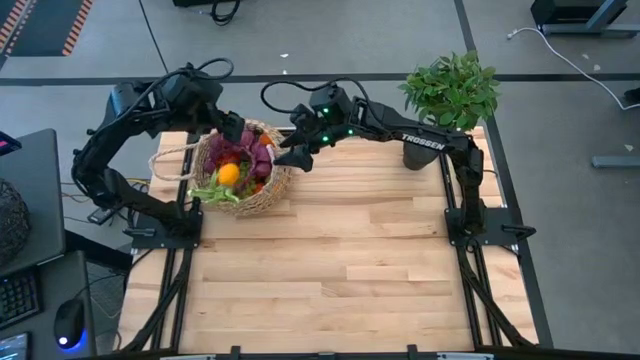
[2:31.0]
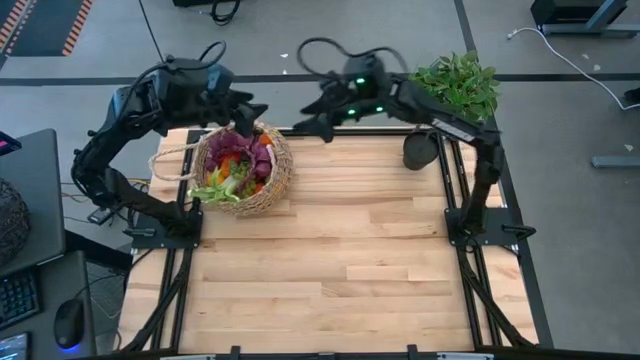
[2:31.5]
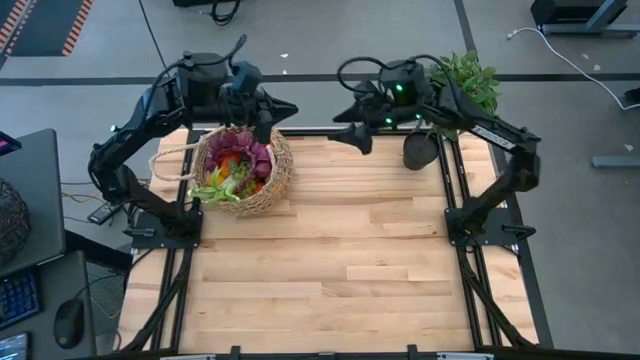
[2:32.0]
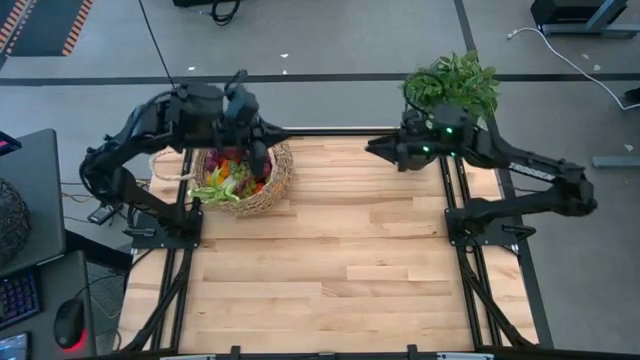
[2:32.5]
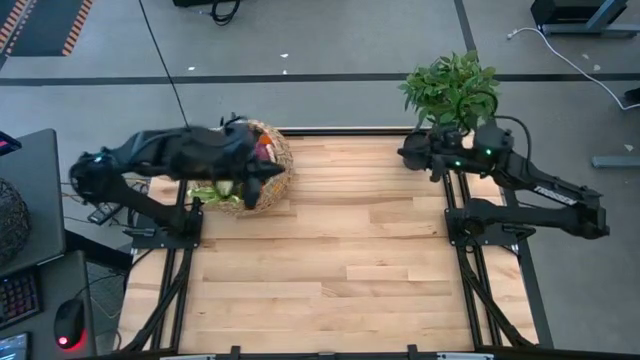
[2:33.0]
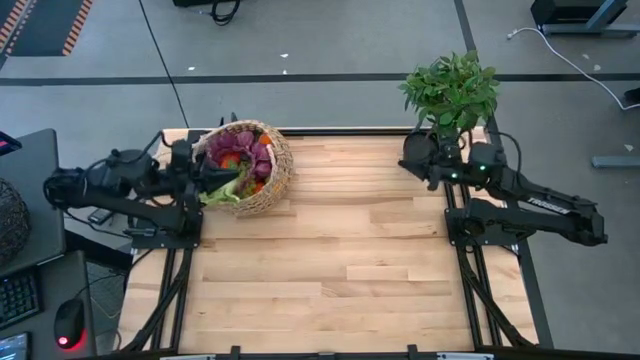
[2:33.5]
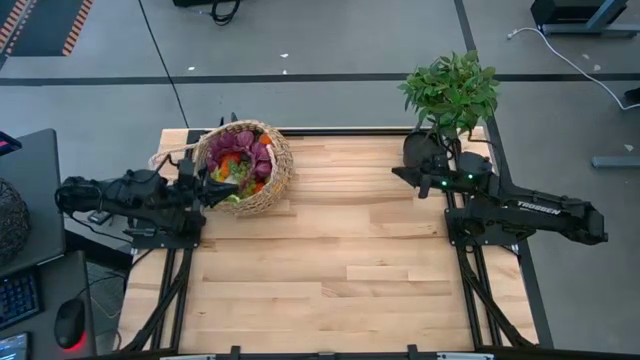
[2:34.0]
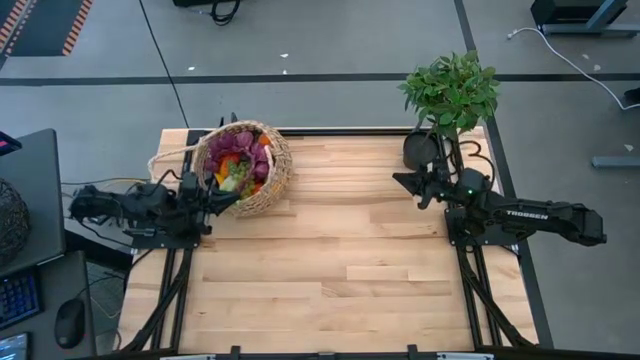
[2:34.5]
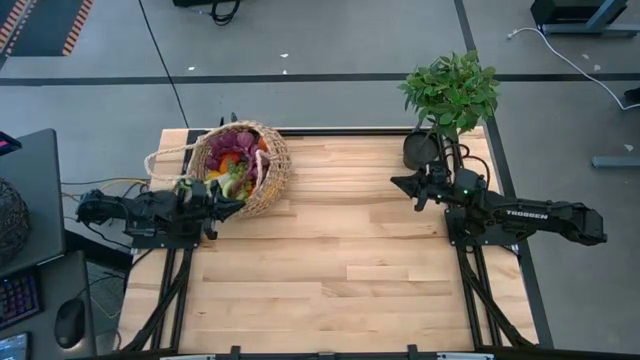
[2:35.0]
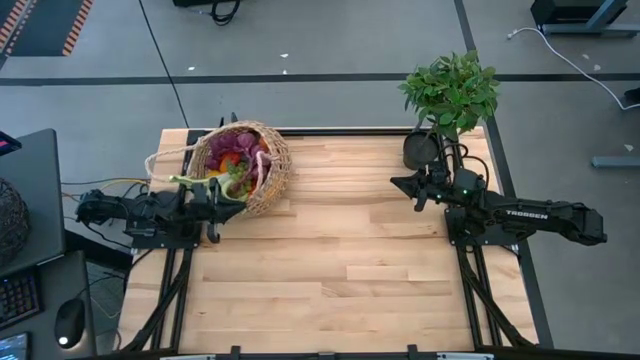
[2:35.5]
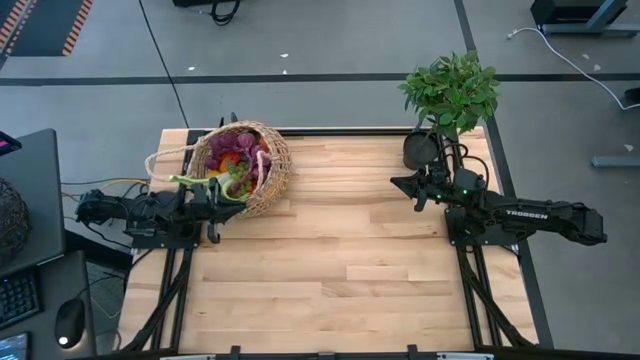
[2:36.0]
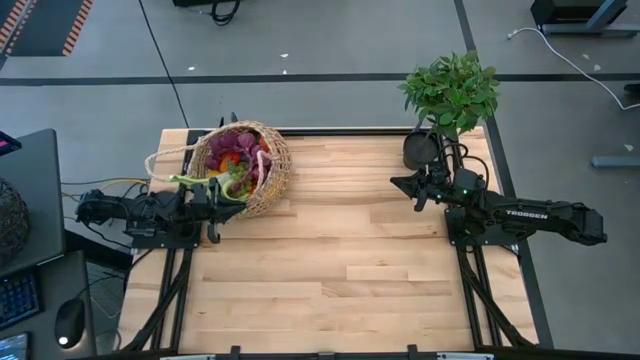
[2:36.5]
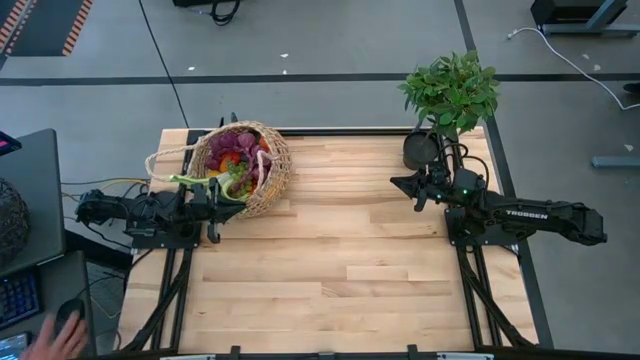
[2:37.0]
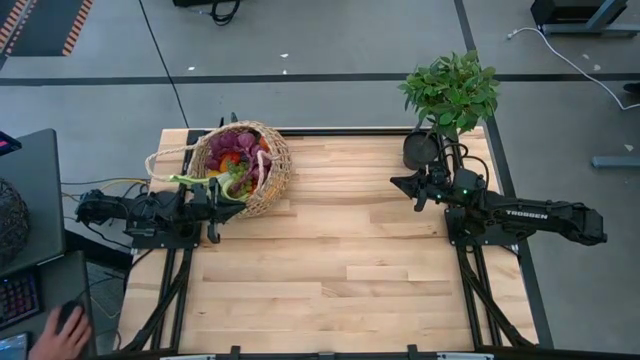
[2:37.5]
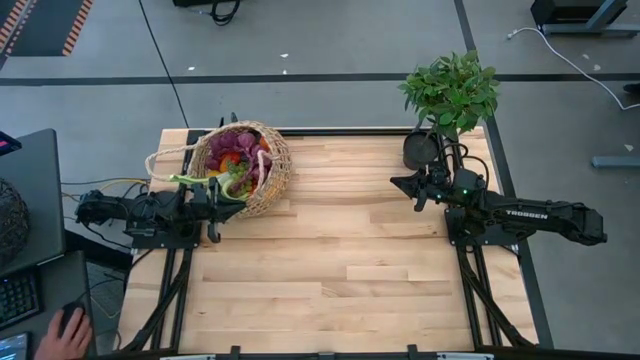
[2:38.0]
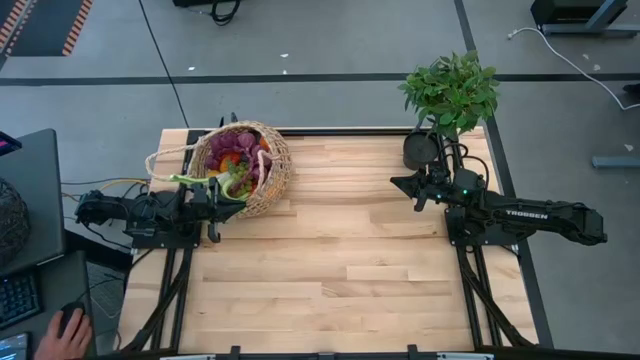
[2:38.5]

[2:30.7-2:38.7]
Task: Build produce basket
Return to Home Position

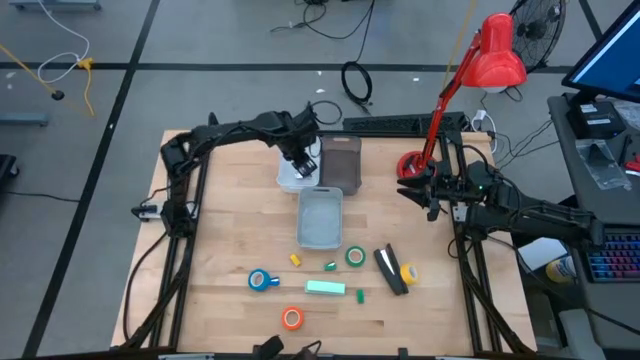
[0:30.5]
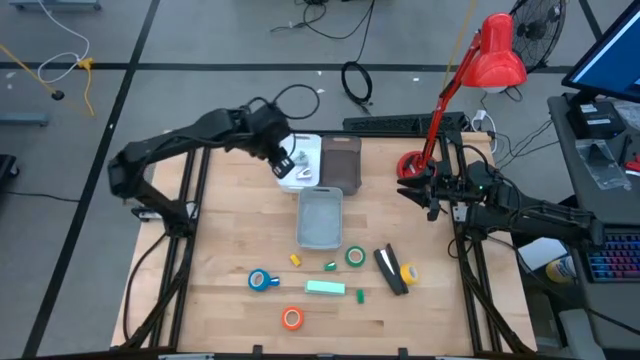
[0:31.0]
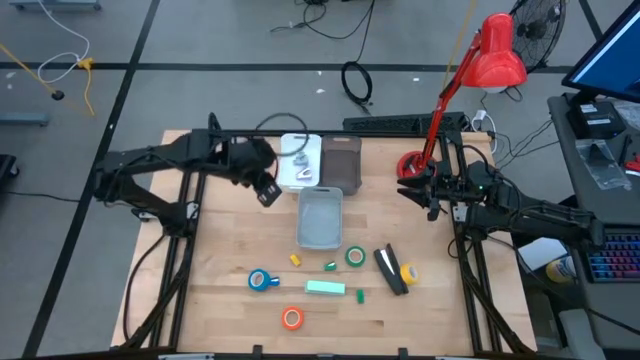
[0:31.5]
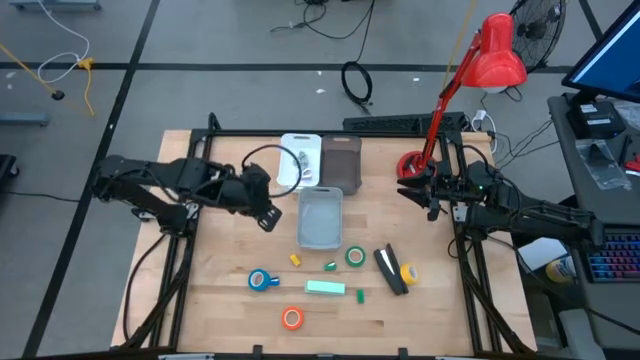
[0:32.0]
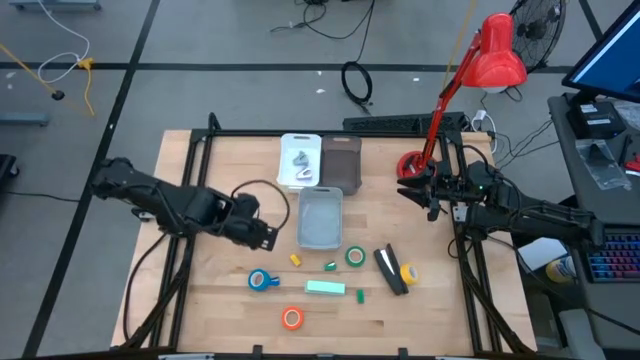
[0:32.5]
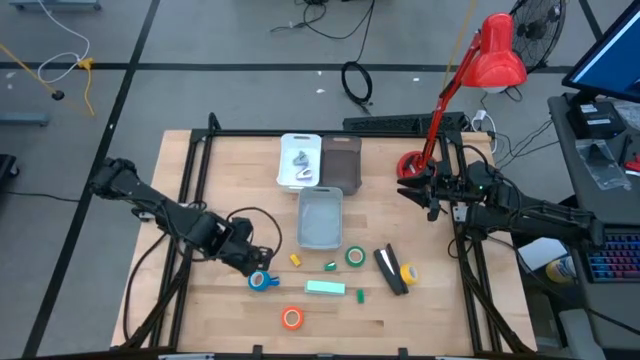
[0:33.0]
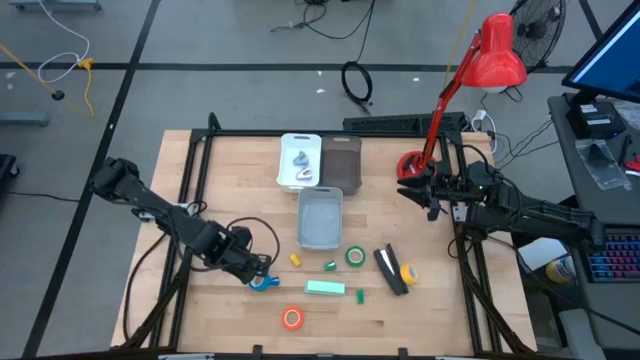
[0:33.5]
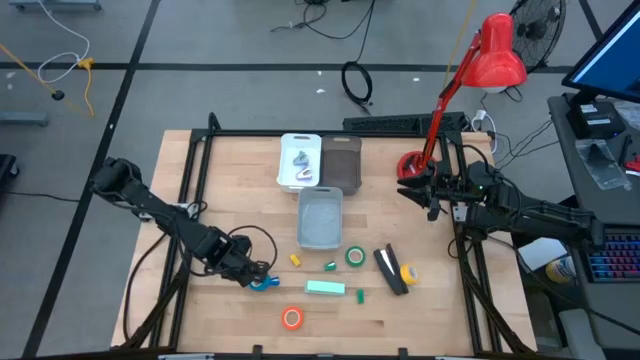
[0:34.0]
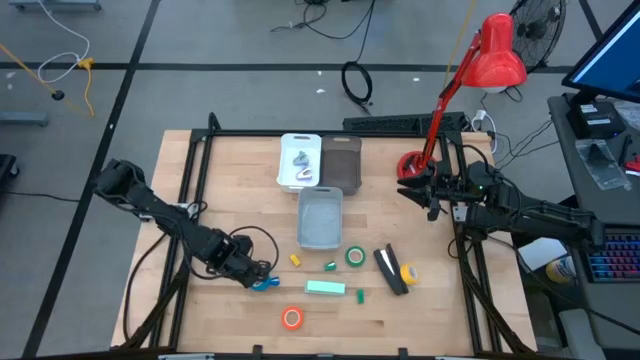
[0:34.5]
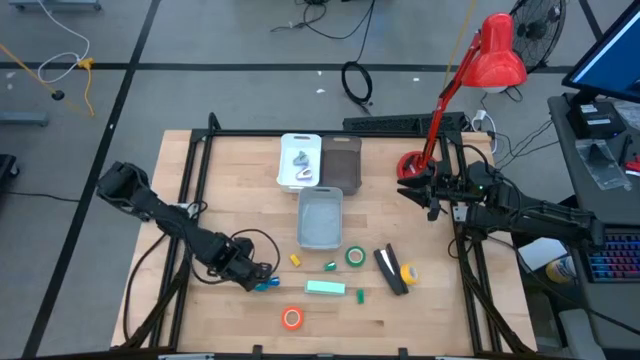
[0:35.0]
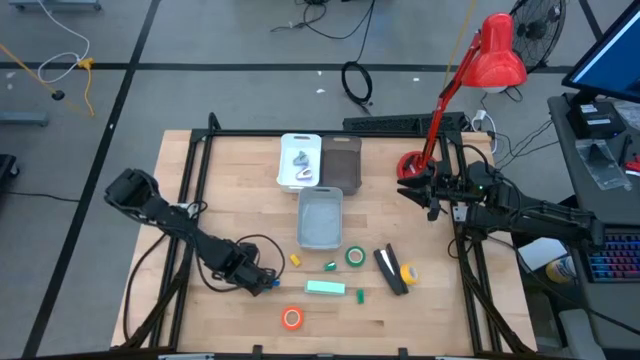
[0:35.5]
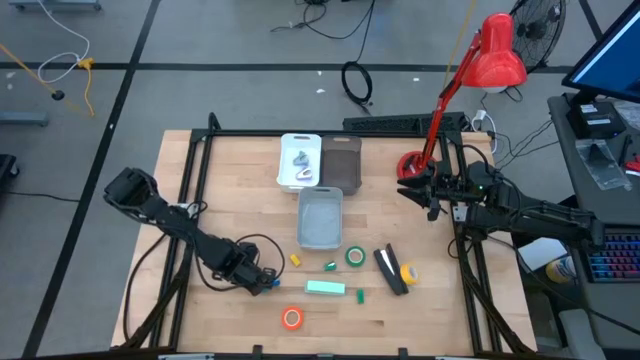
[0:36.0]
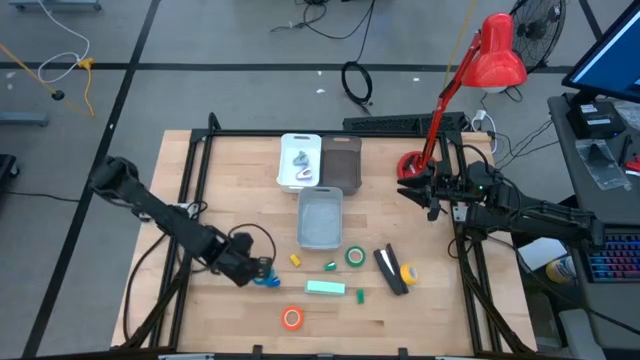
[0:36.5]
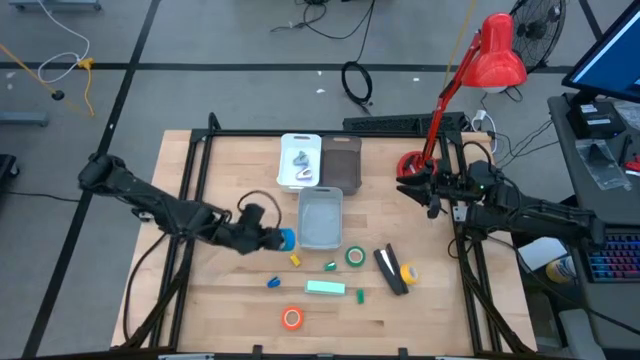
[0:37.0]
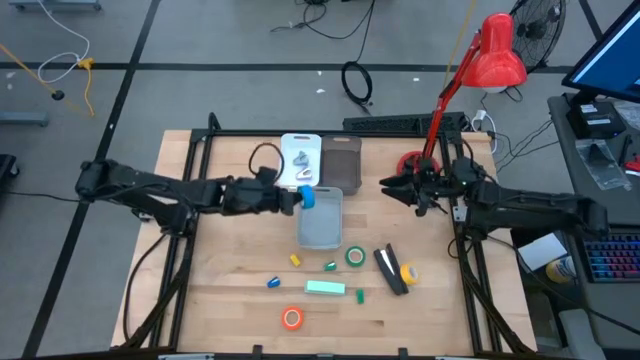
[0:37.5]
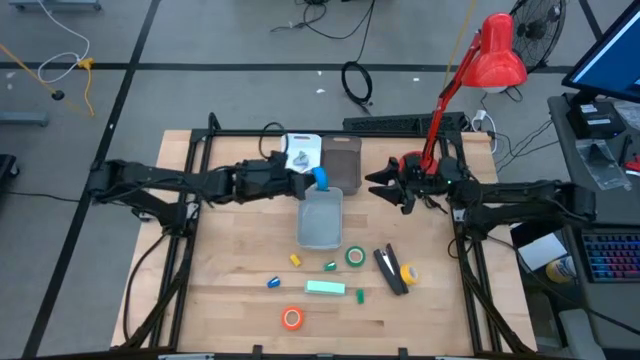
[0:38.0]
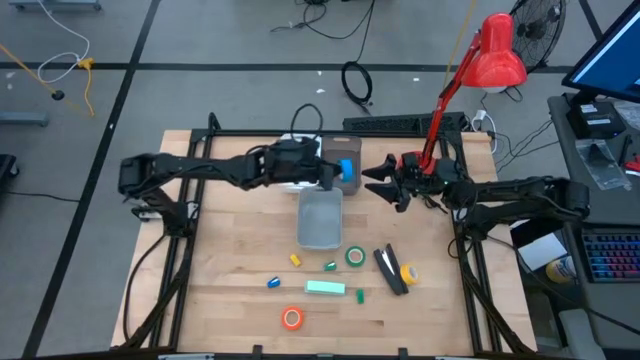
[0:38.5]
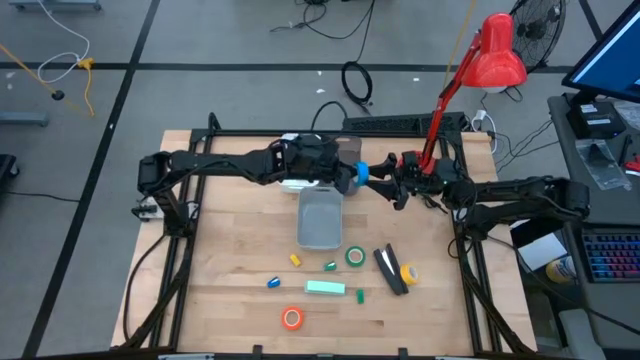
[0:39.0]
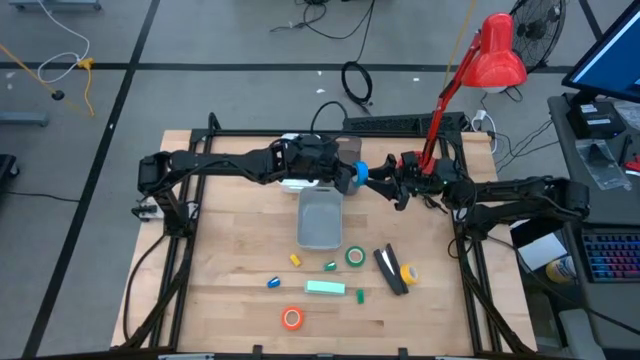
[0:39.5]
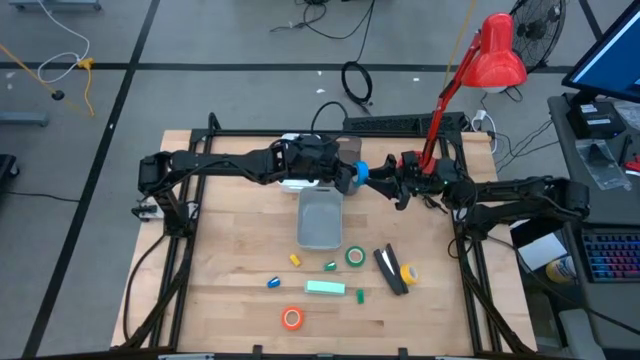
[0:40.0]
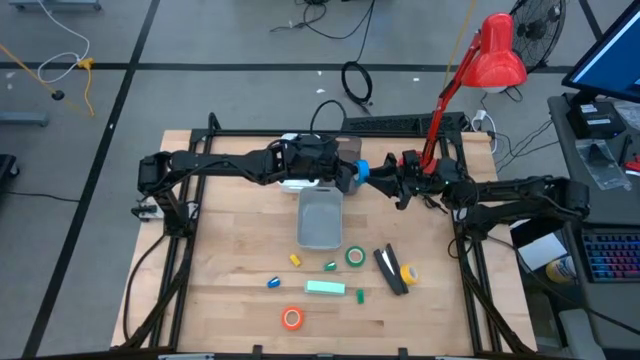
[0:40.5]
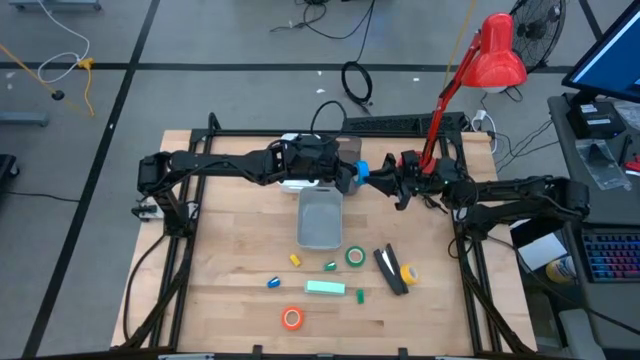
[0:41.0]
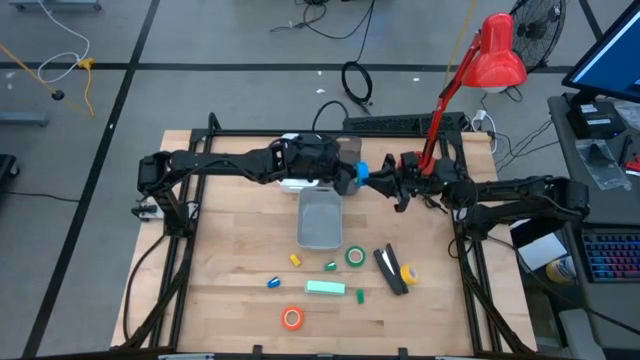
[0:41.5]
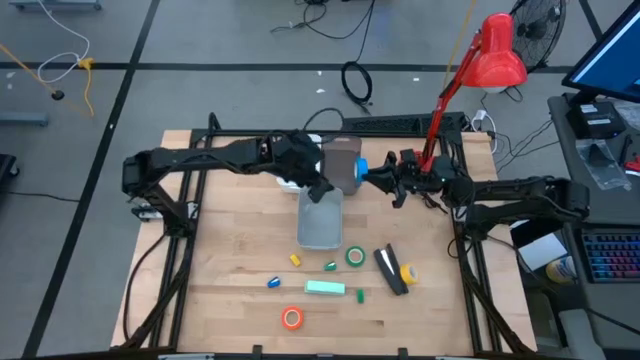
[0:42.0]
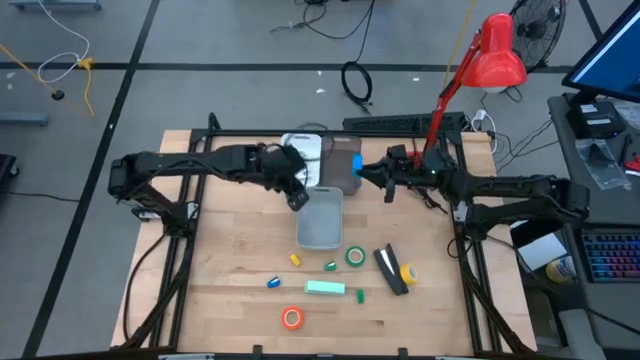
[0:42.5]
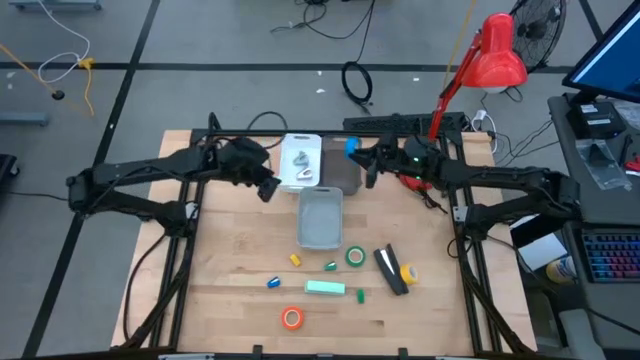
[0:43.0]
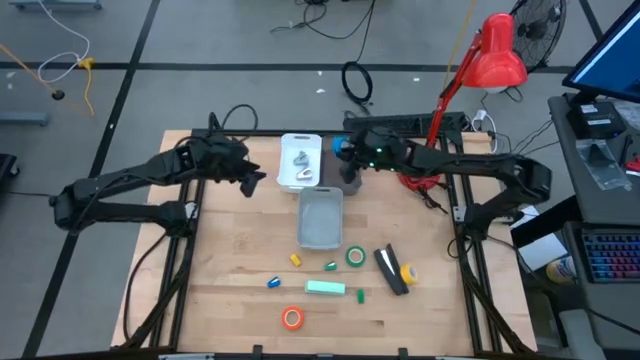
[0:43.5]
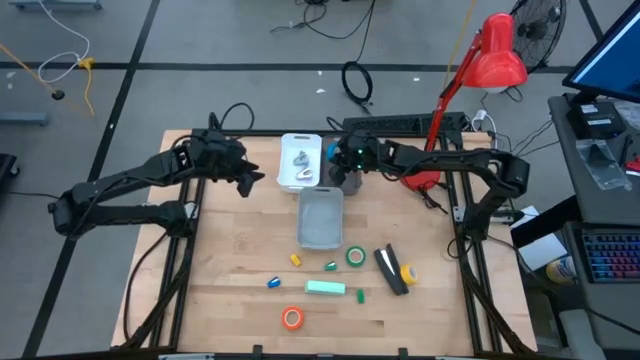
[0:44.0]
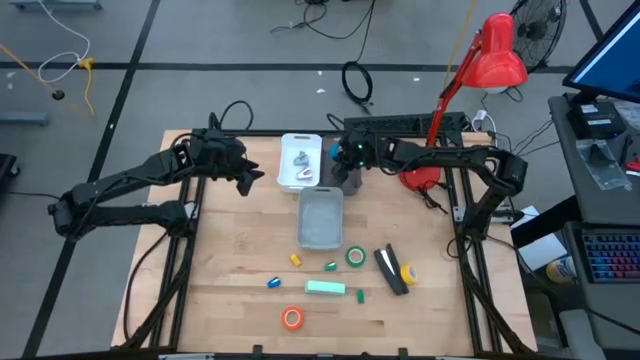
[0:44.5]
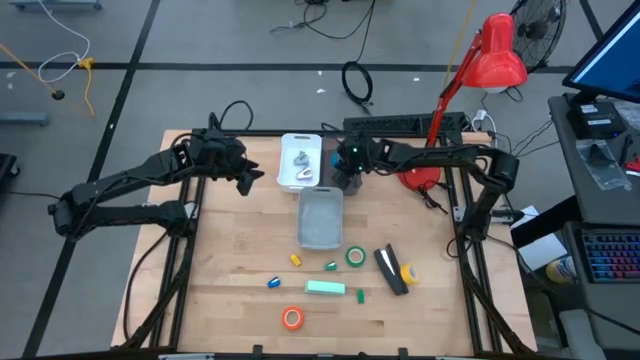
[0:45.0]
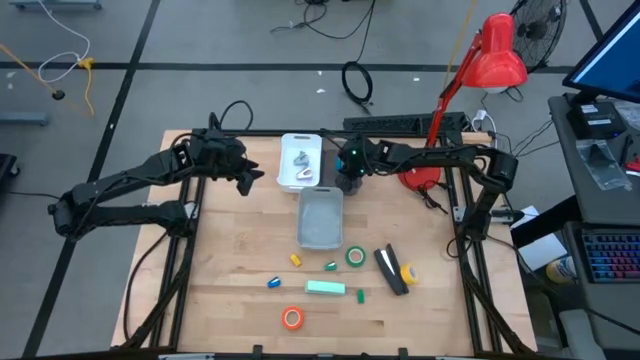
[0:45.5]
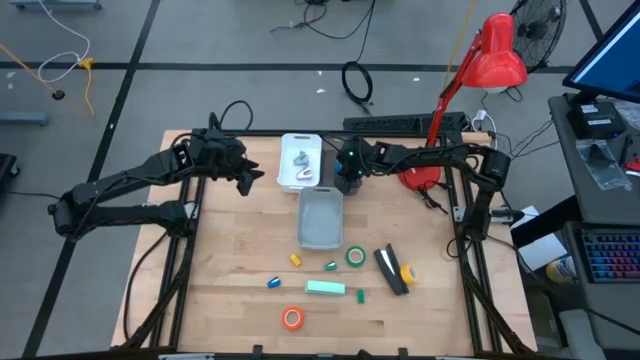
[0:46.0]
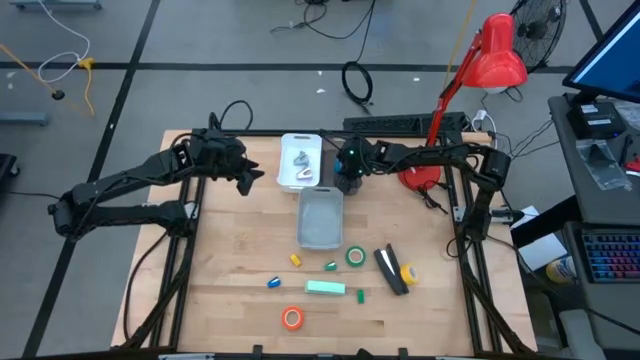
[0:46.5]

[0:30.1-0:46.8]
Task: Pick and place Stapler, Stapler remover, tape
Put the blue tape into the black bin
